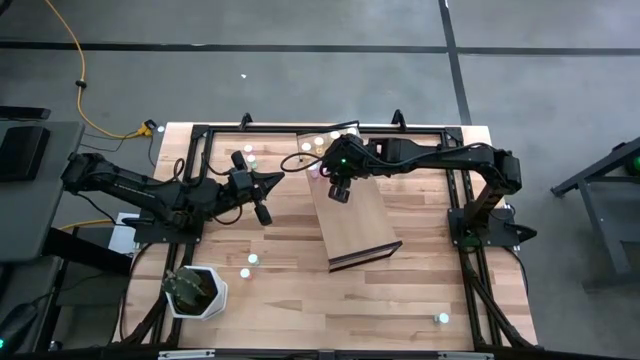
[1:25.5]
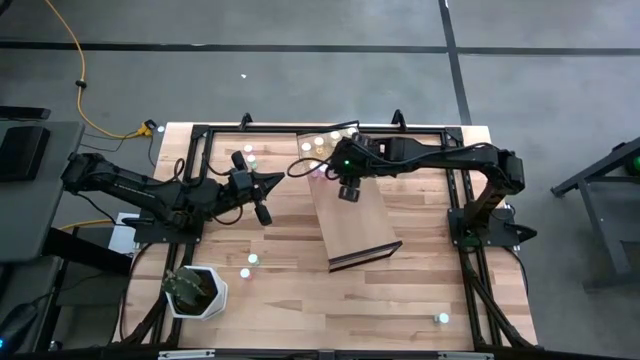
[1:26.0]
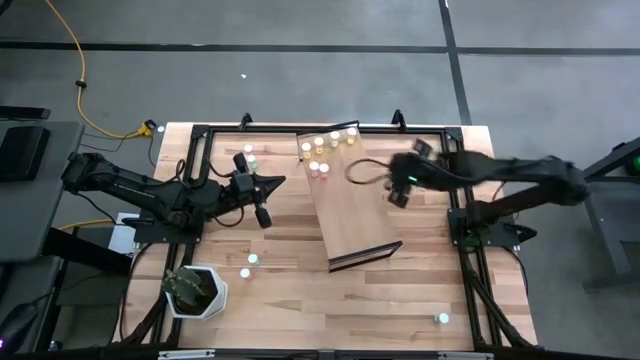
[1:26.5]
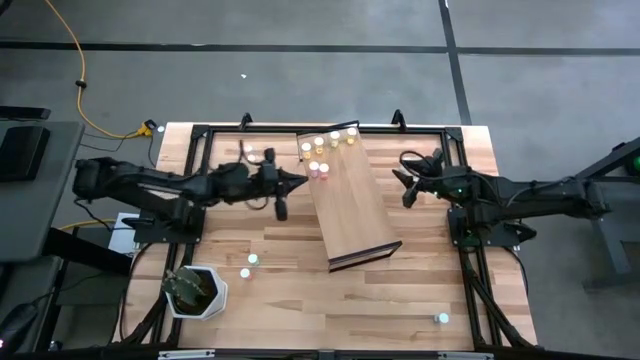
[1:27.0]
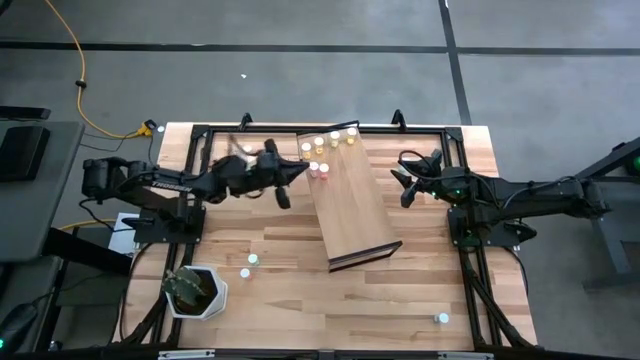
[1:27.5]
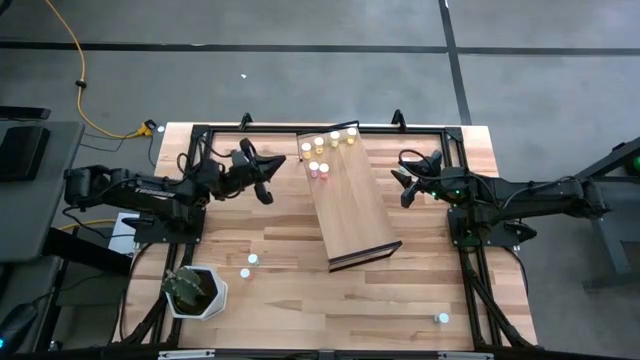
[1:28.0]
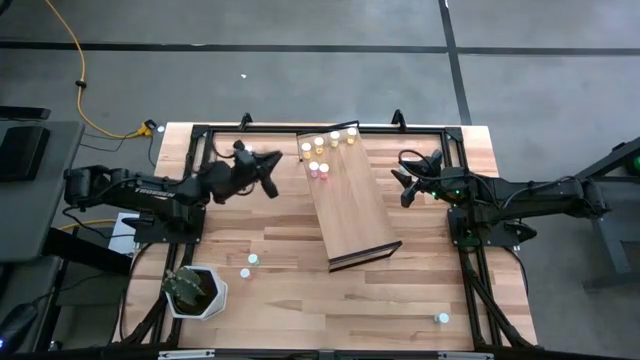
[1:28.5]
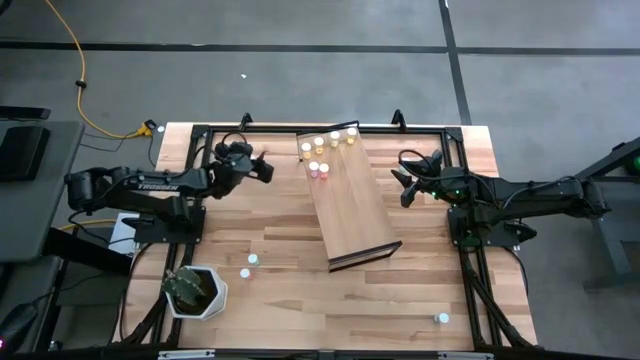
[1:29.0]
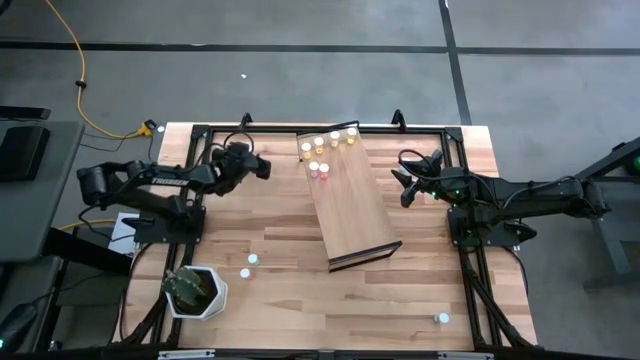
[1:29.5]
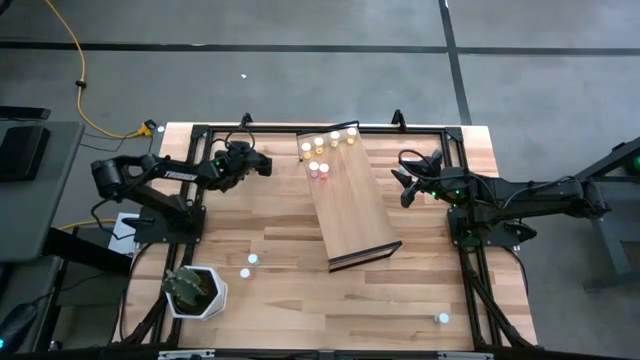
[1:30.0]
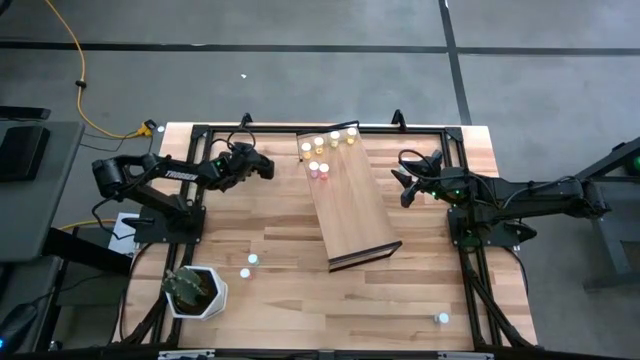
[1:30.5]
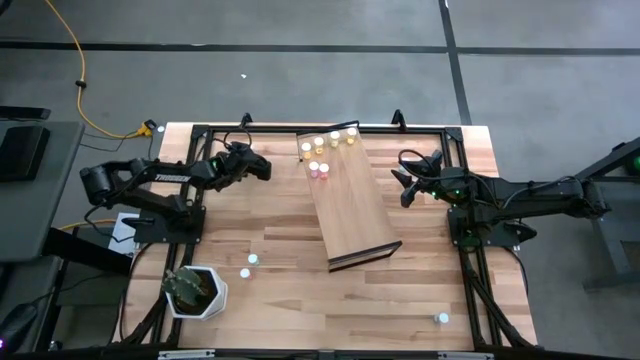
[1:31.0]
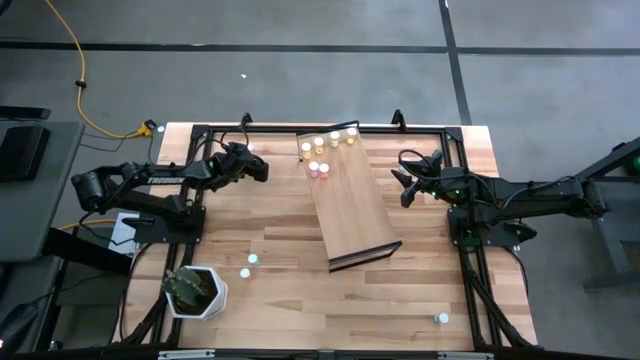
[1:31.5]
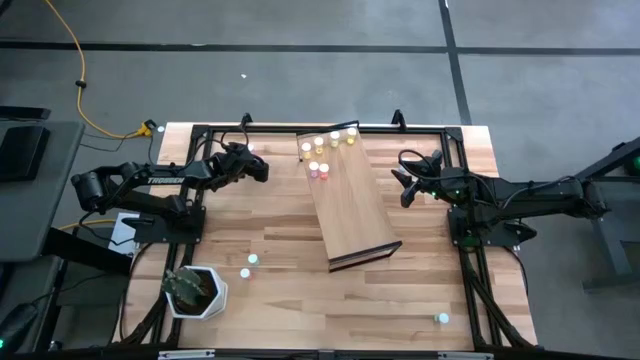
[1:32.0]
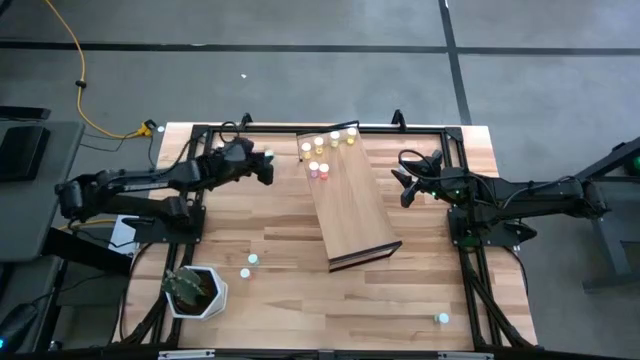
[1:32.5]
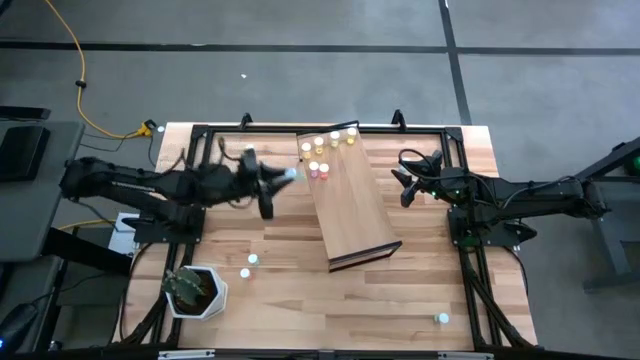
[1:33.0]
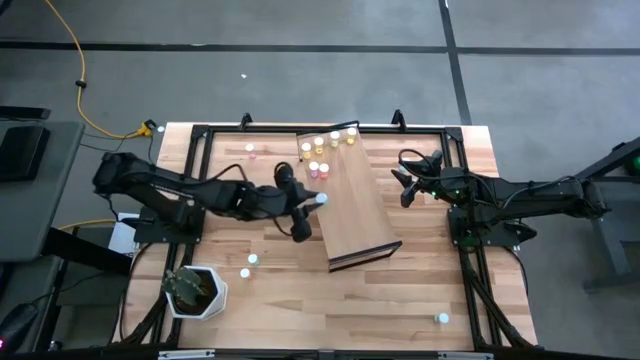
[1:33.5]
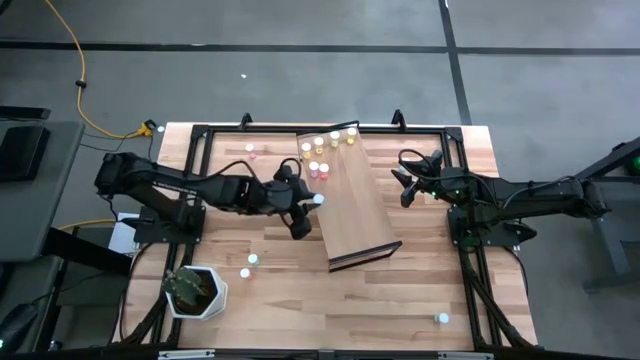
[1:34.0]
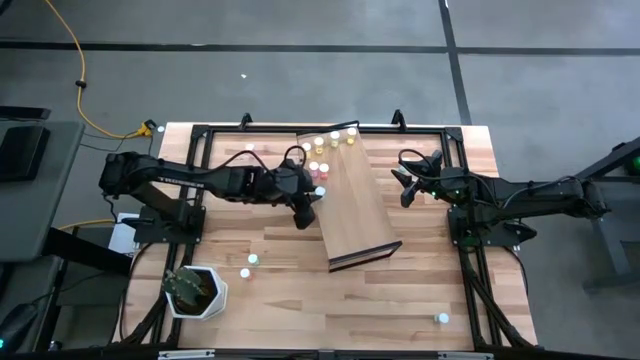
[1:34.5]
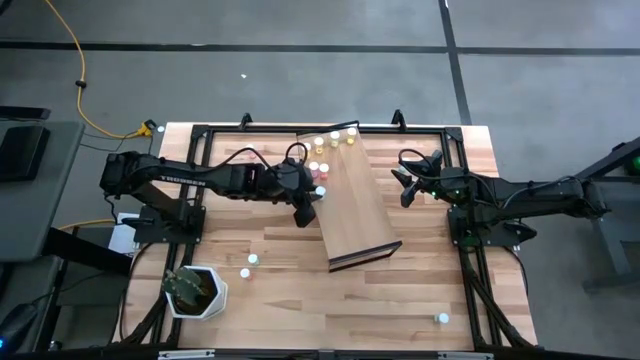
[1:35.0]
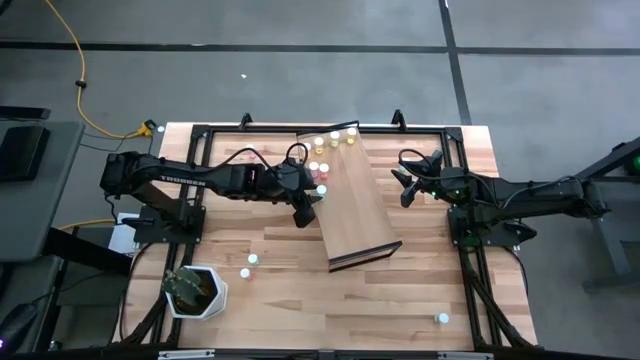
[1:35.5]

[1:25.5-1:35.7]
Task: Pick and place medicine bottles onto shelf by color
Put the blue pill bottle on the shelf

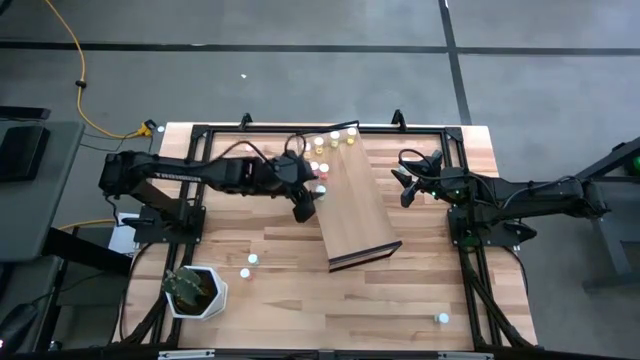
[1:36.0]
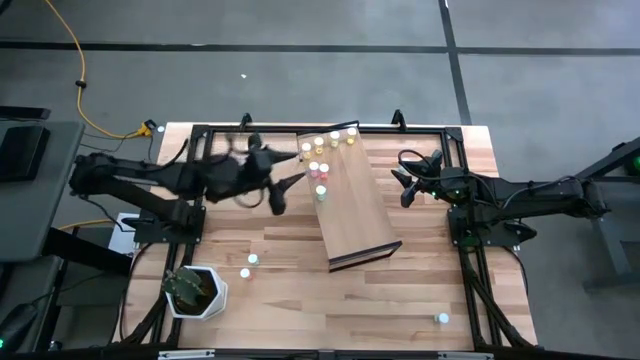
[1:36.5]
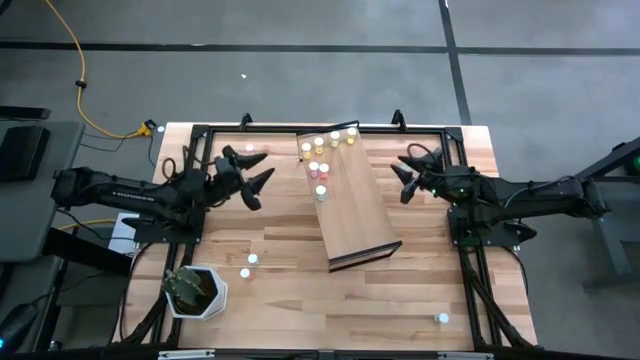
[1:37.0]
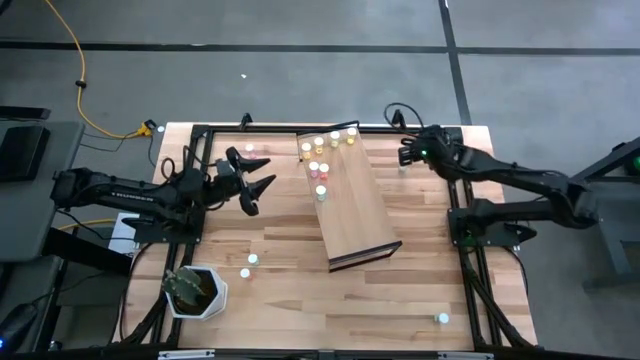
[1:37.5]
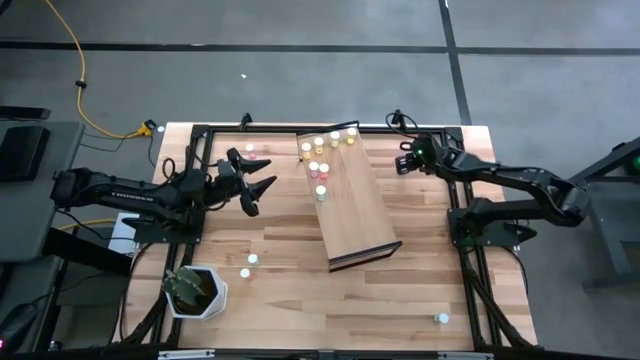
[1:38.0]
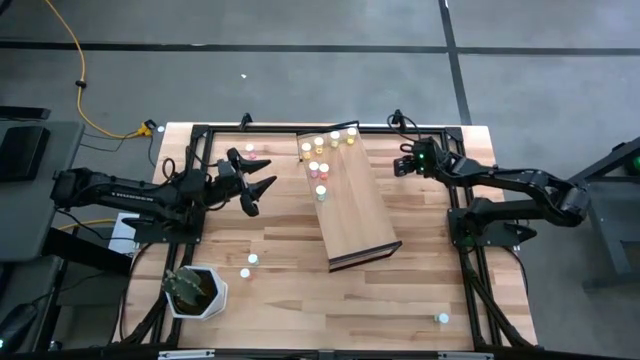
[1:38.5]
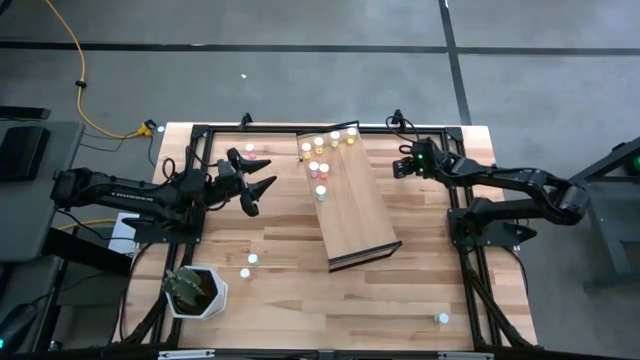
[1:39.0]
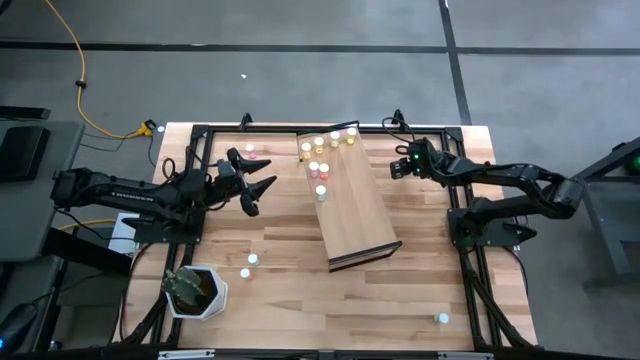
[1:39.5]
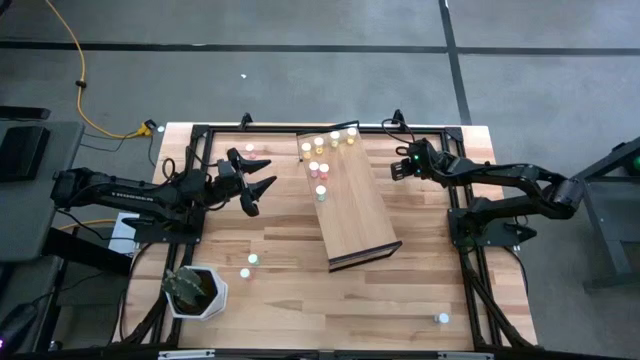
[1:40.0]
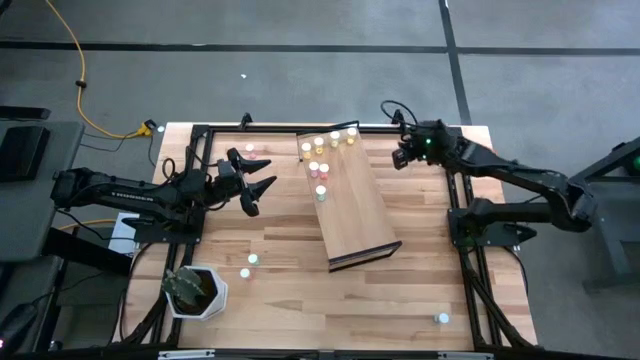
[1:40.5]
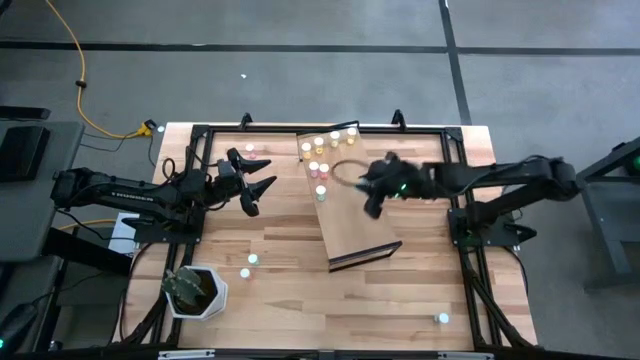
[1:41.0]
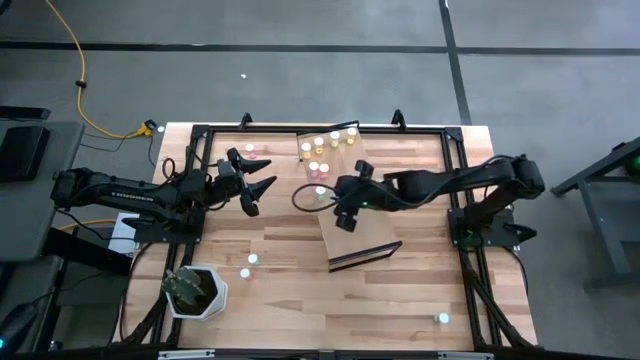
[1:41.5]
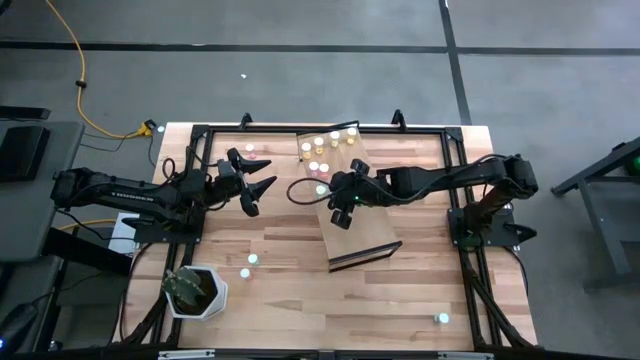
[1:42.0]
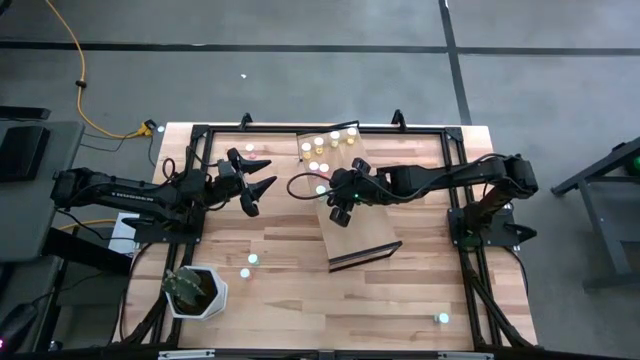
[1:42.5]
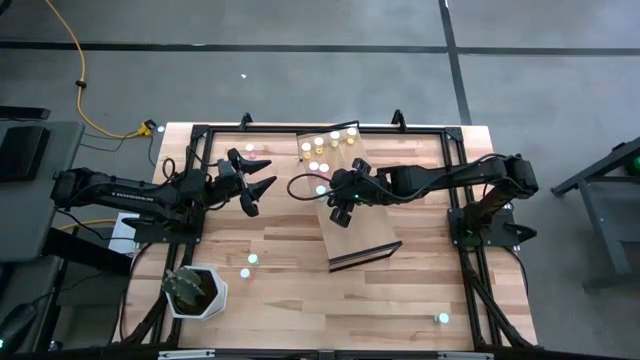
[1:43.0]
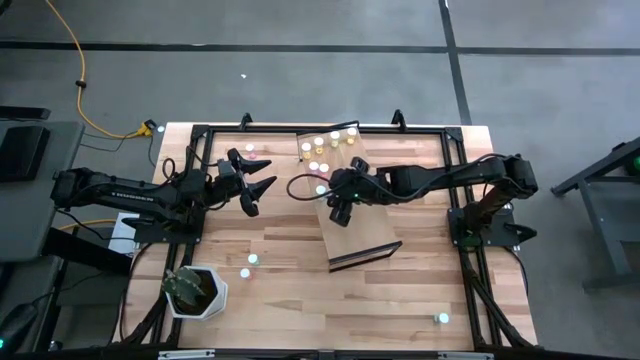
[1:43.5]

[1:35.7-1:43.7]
Put the blue pill bottle on the shelf aligned with the other blue pill bottle

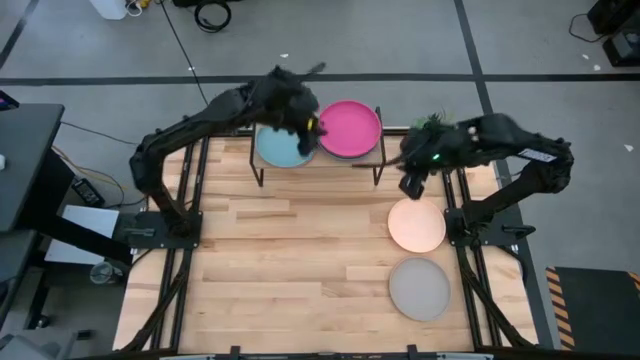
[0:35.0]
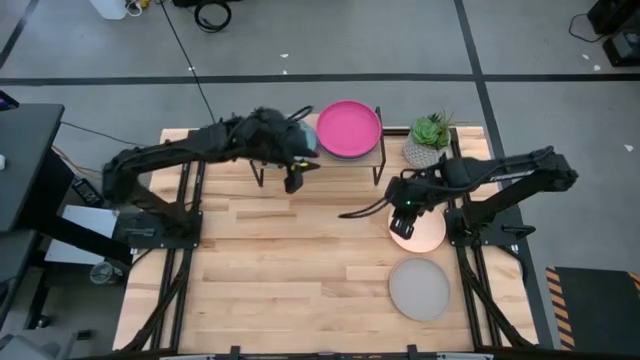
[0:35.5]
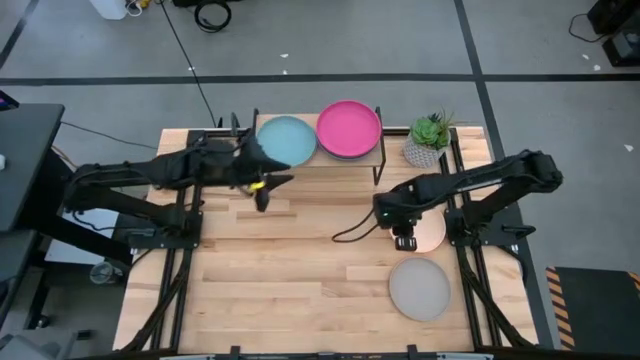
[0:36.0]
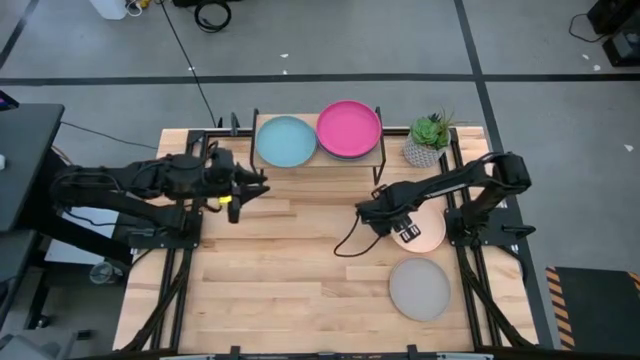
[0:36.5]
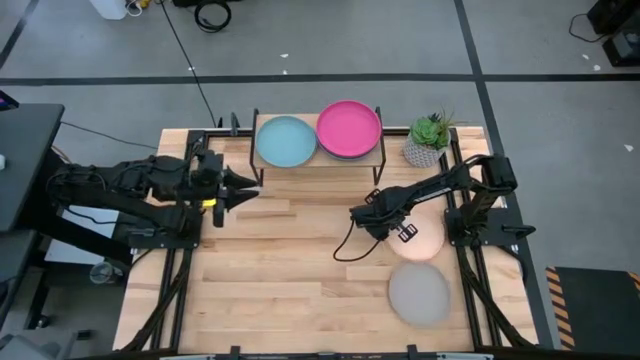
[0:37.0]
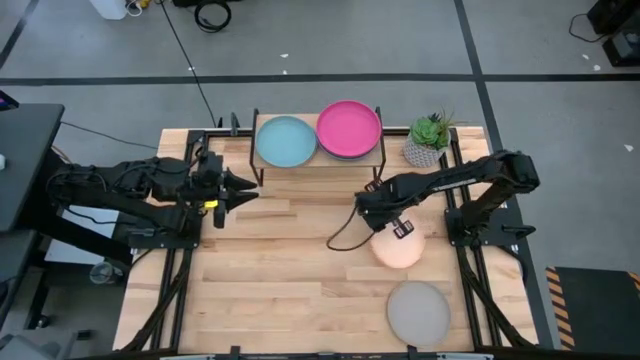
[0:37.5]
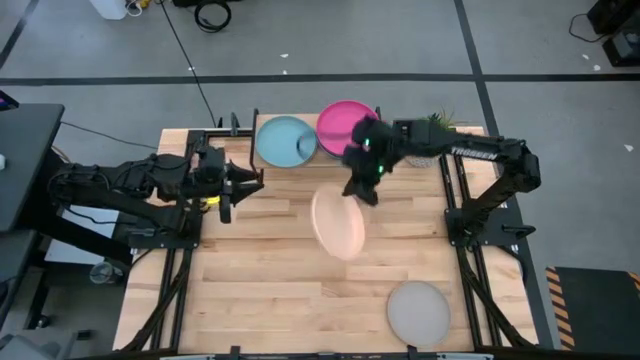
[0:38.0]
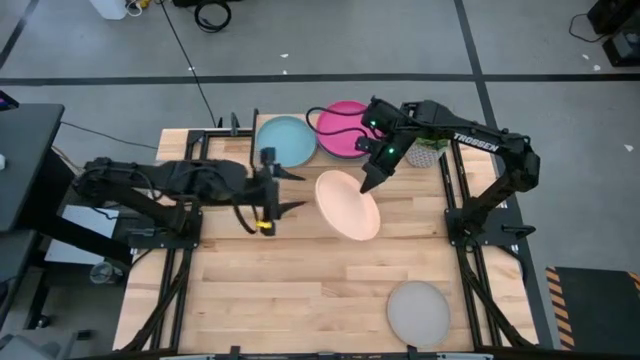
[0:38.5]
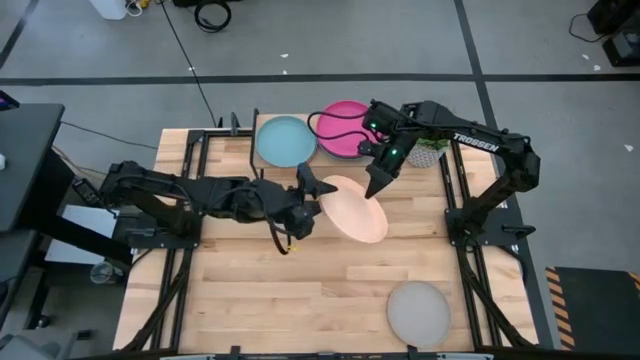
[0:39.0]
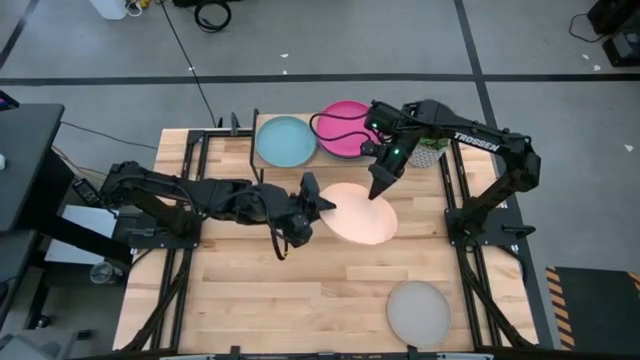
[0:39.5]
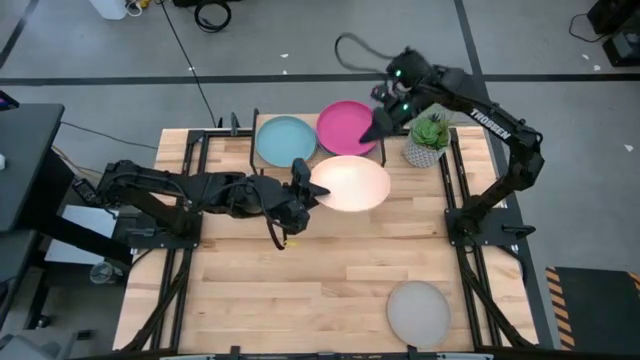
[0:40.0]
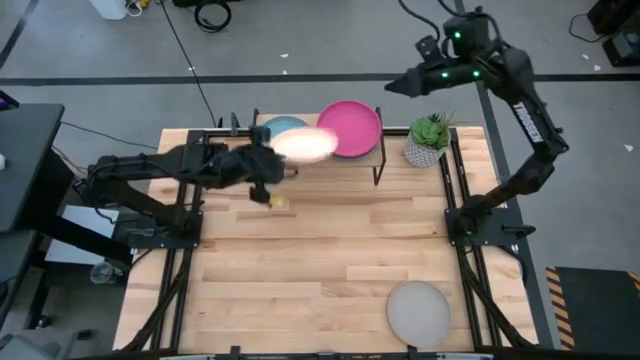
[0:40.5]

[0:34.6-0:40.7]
Task: Place and stack plates onto a shelf
Stack the light yellow plate into the light blue plate on the shelf
